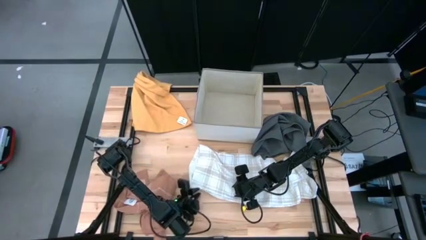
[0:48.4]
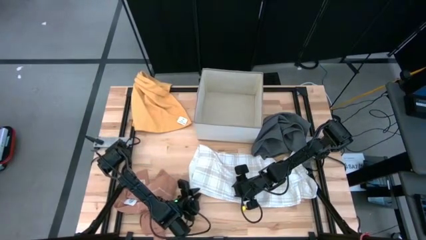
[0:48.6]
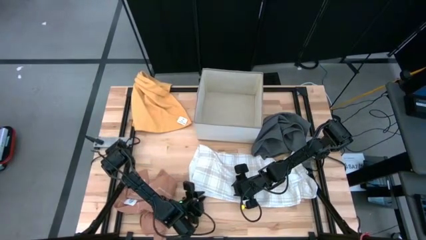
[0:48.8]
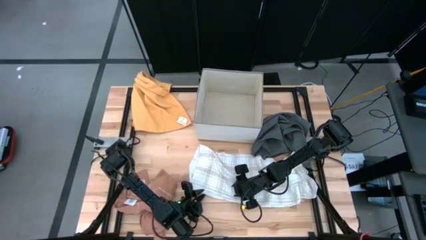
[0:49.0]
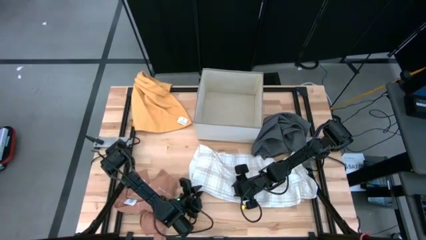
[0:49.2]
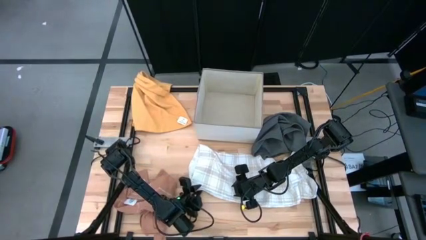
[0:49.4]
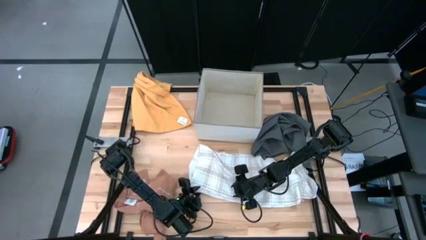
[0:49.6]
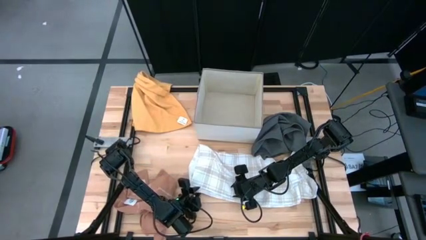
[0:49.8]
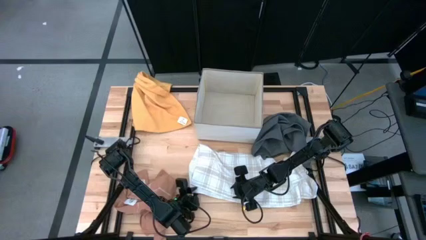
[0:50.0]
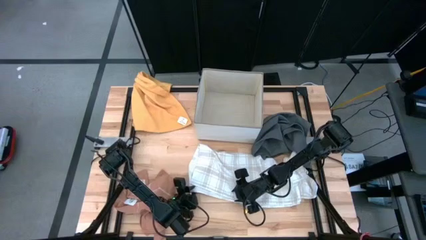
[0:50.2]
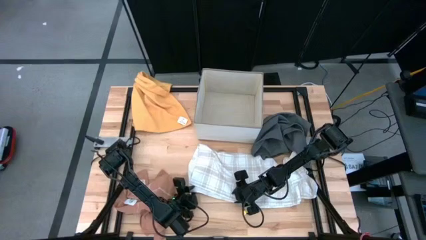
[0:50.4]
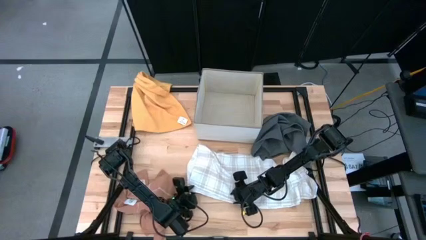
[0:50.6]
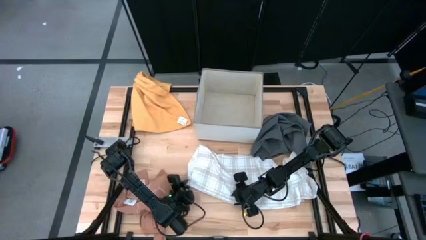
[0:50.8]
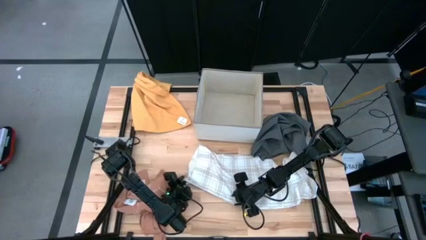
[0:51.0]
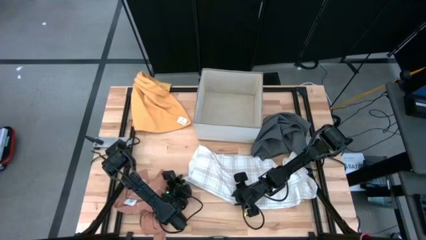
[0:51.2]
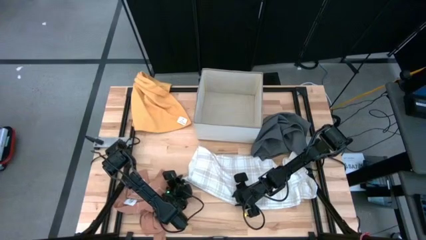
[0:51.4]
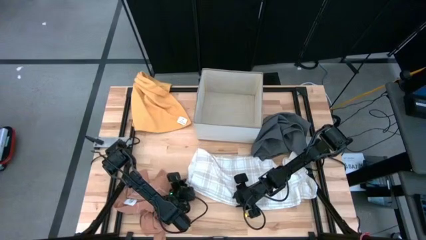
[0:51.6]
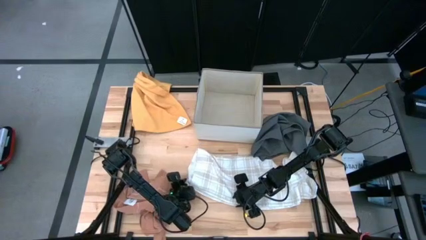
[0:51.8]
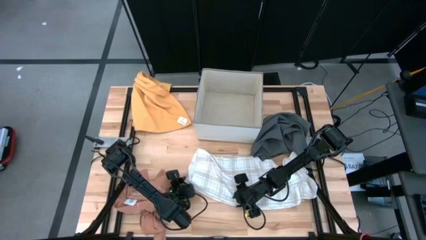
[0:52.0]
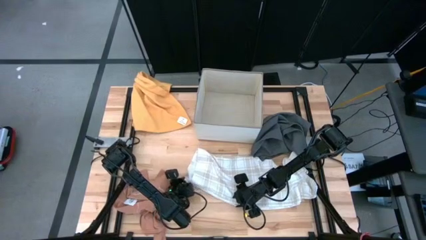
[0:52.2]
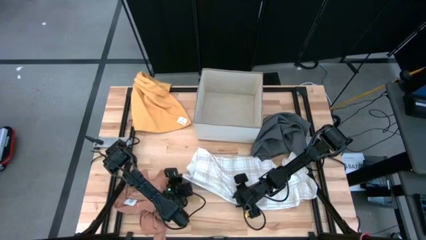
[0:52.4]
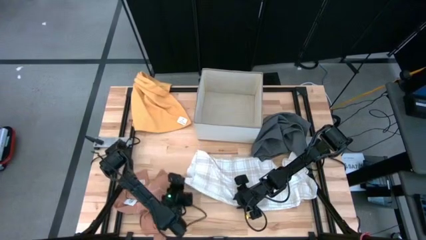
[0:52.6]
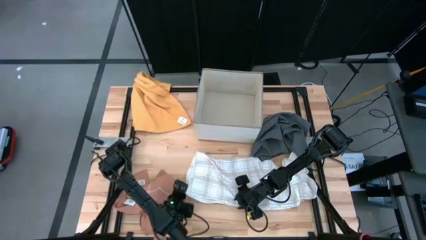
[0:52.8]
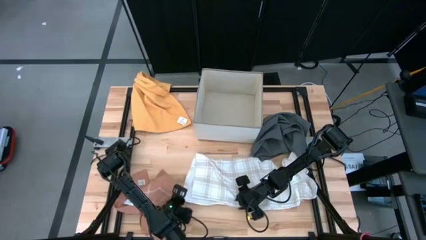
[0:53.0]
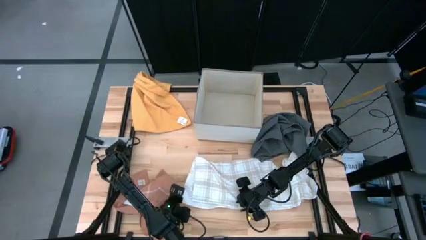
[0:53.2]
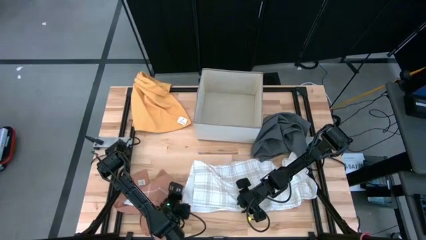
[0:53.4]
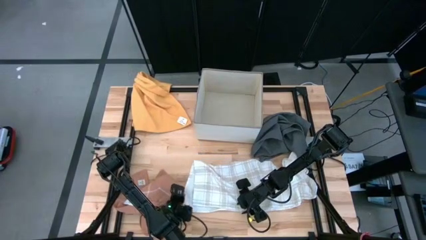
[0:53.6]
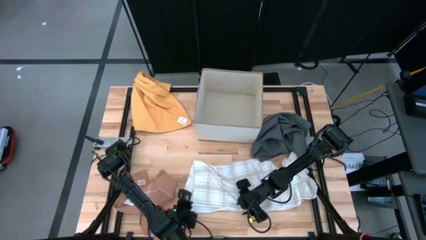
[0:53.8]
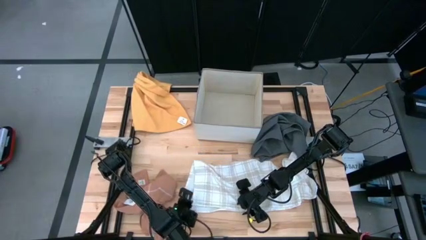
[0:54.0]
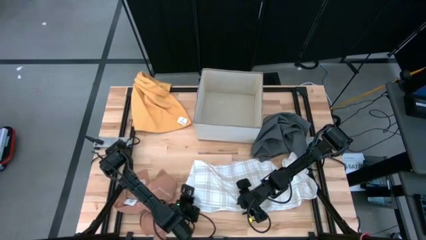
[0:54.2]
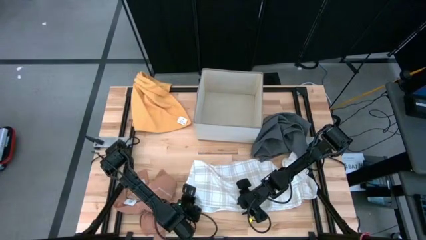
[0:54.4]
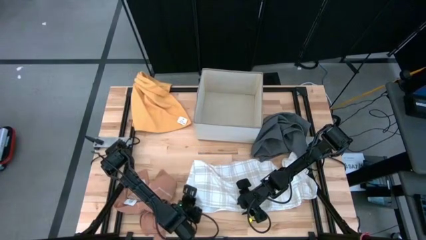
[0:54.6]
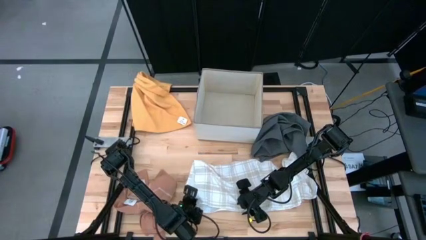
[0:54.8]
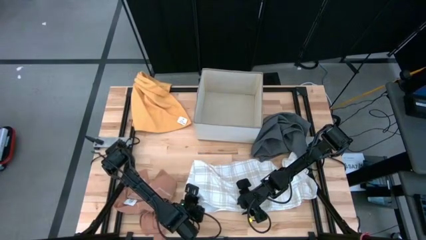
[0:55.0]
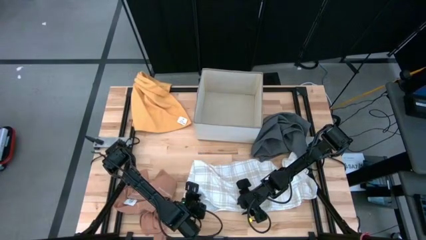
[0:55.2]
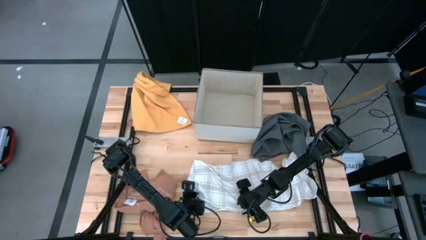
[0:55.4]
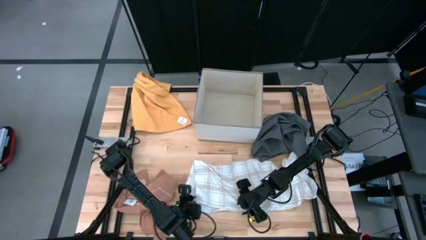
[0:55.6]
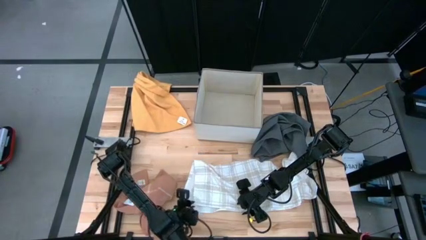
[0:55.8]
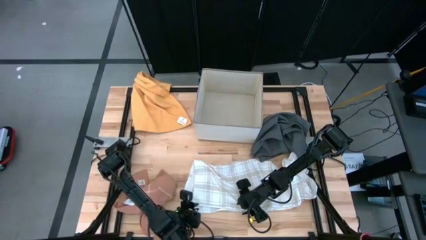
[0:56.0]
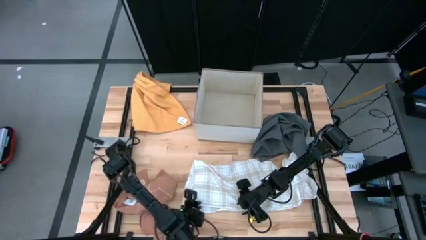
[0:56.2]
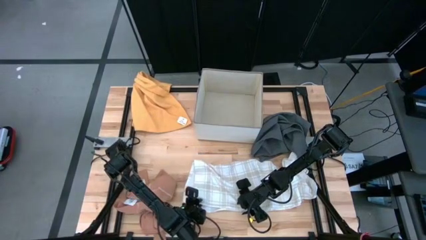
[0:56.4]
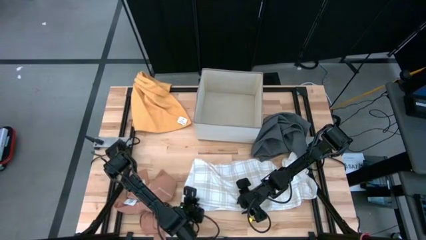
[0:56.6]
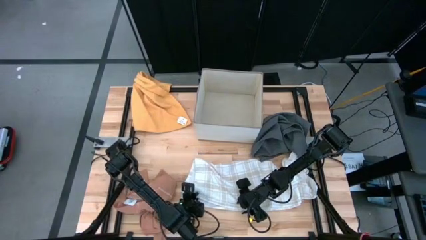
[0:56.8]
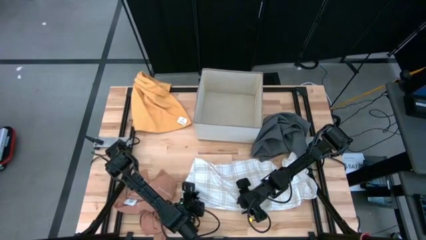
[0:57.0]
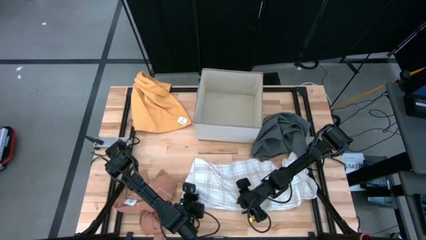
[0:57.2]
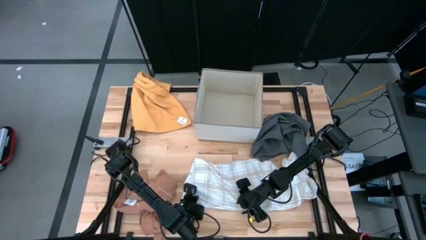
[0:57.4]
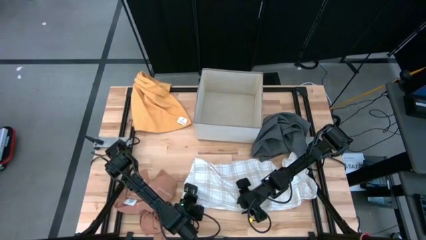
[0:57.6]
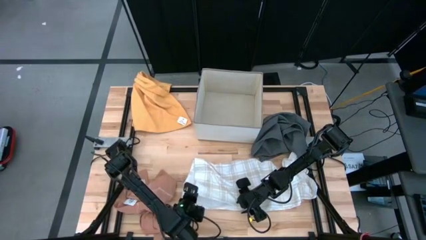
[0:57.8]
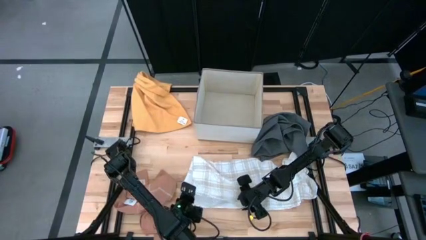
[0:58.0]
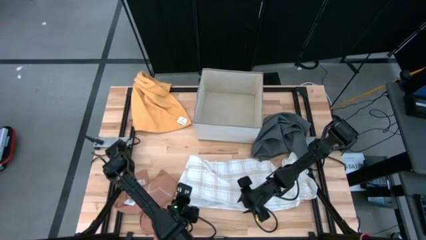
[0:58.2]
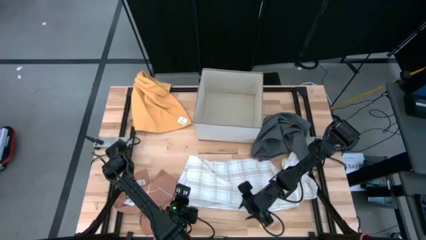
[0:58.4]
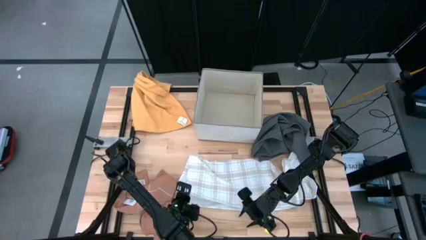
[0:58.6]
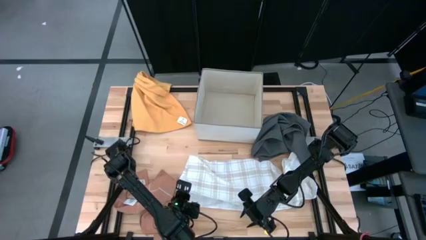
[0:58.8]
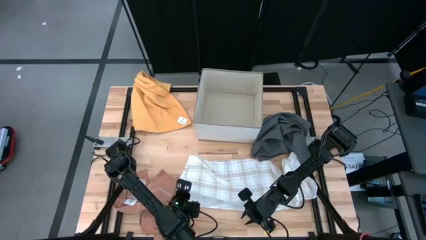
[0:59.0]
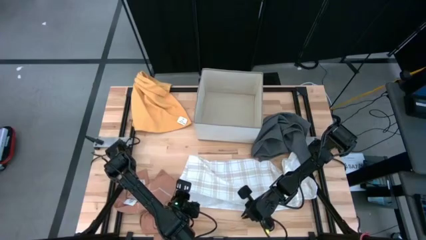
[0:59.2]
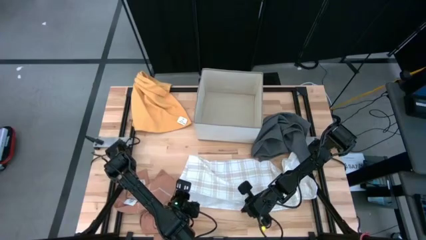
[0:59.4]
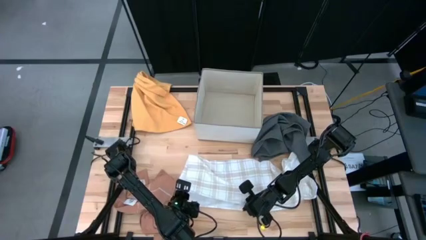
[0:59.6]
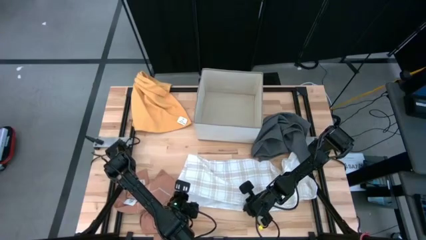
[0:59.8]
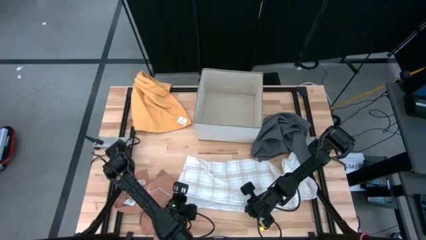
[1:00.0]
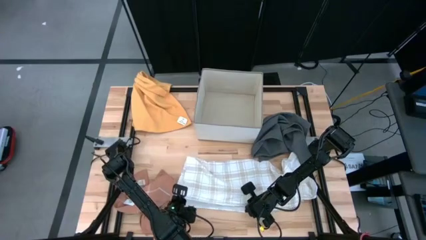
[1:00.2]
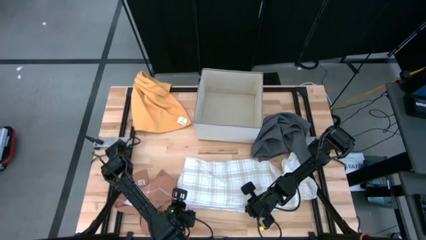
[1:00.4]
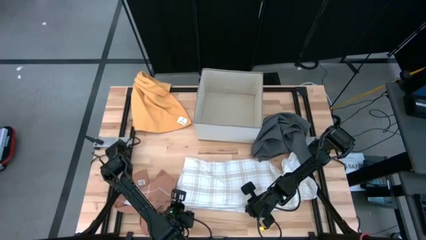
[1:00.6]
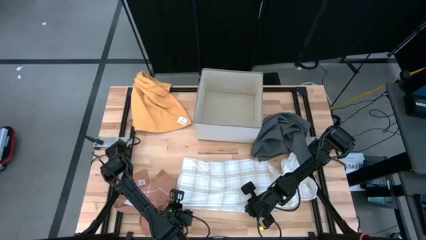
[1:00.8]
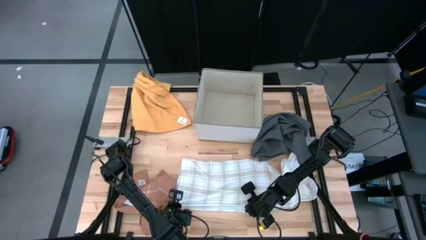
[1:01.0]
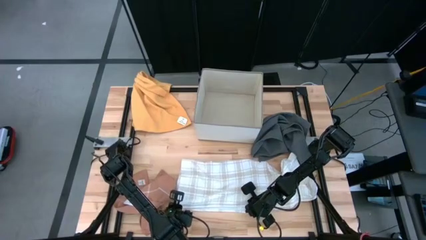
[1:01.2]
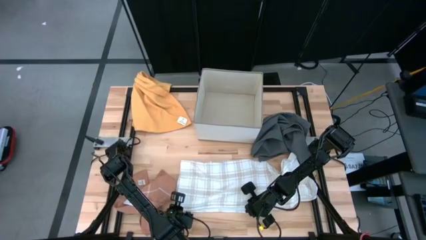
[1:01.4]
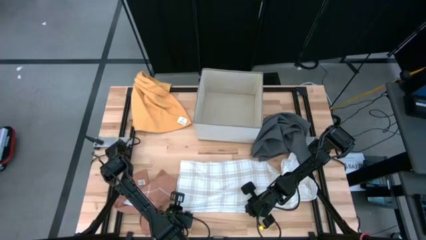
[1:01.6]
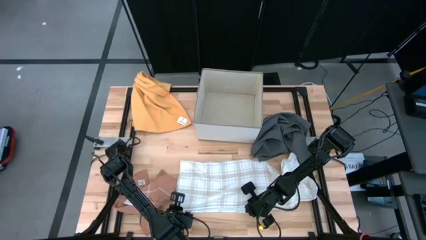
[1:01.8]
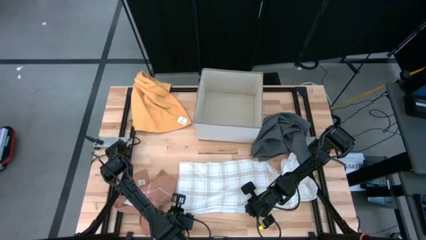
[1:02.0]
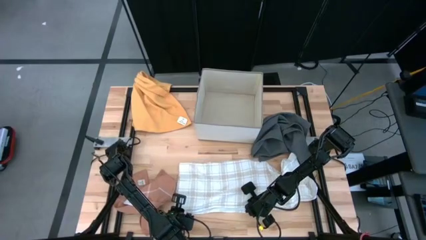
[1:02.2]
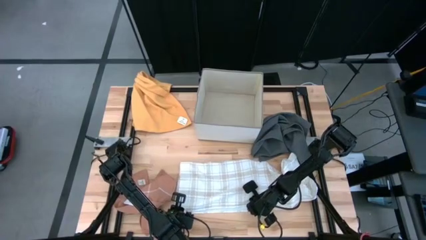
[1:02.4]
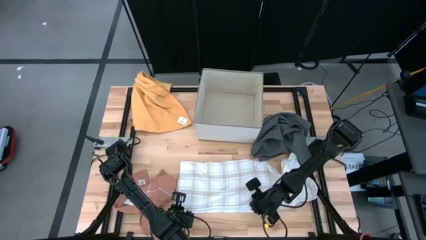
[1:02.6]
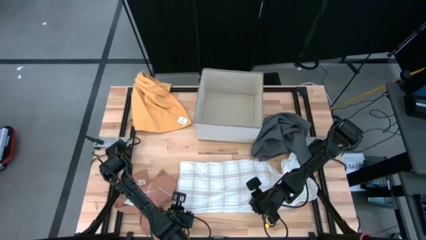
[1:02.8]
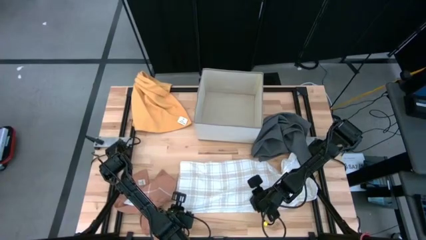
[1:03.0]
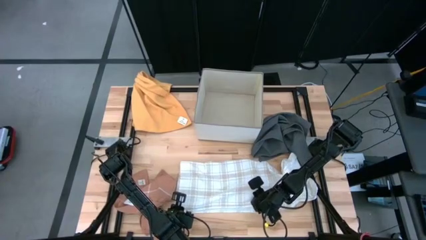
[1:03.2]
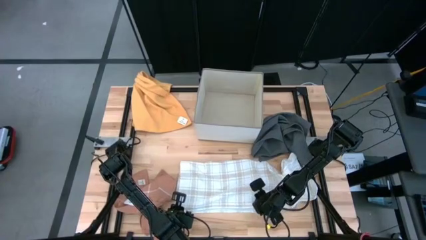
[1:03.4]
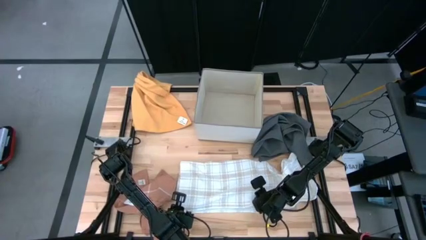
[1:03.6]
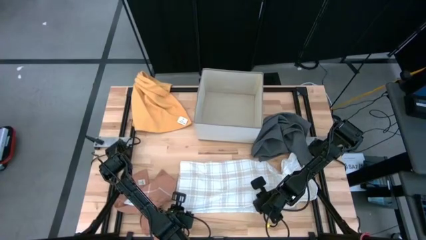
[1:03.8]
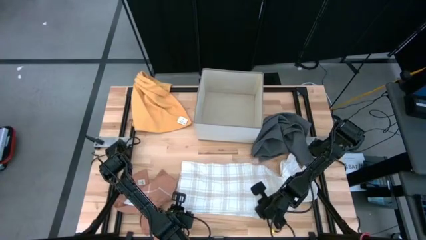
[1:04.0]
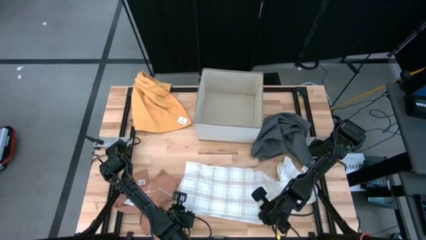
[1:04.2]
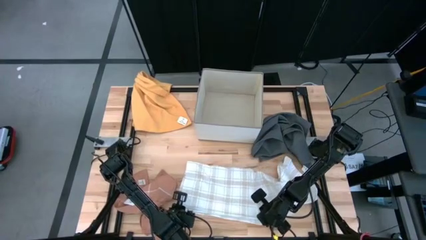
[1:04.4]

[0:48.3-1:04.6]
Task: Fold towel
Fold the white towel
